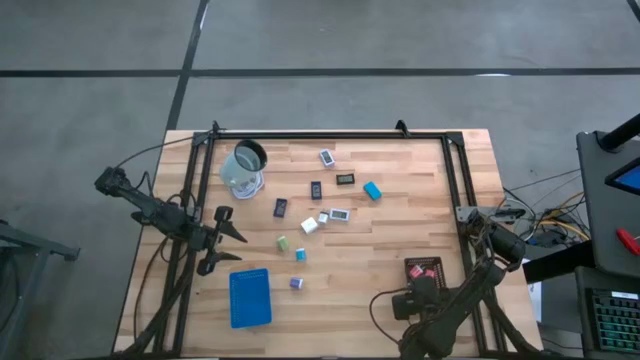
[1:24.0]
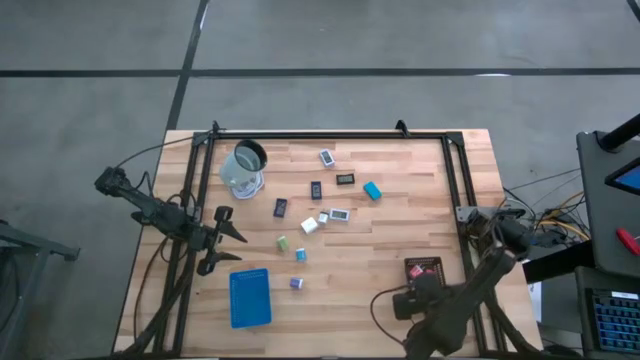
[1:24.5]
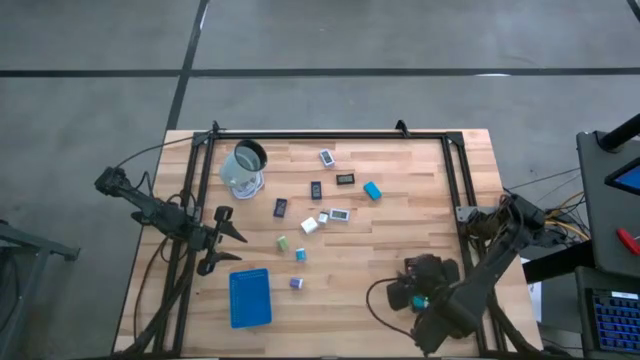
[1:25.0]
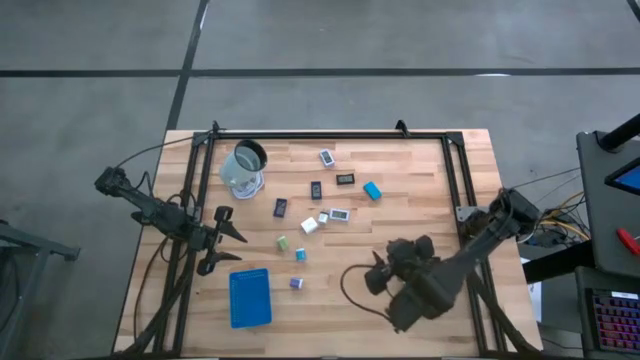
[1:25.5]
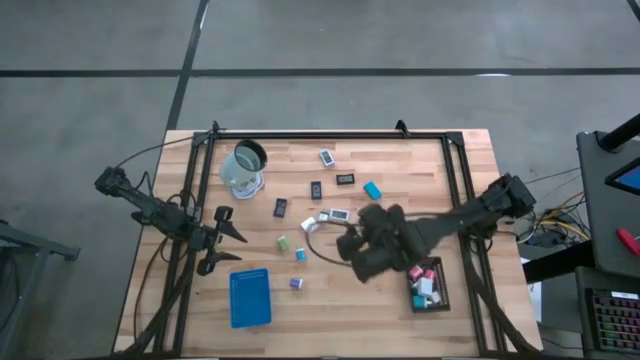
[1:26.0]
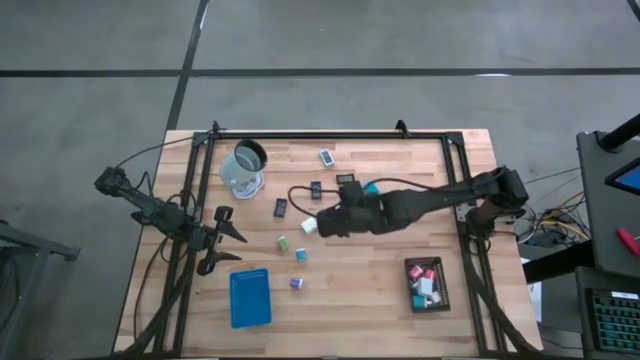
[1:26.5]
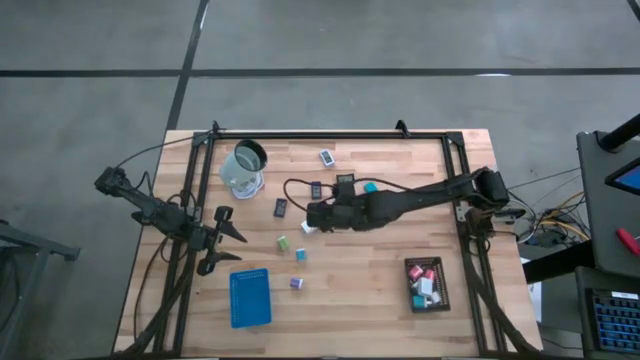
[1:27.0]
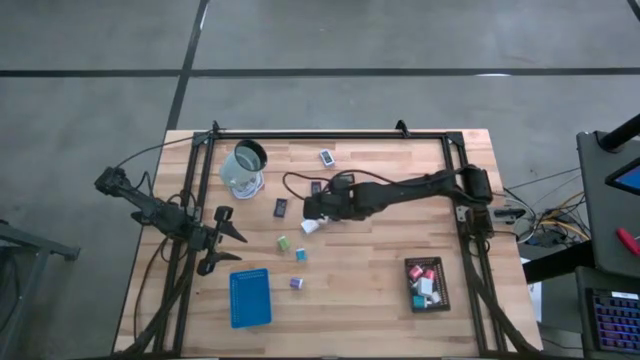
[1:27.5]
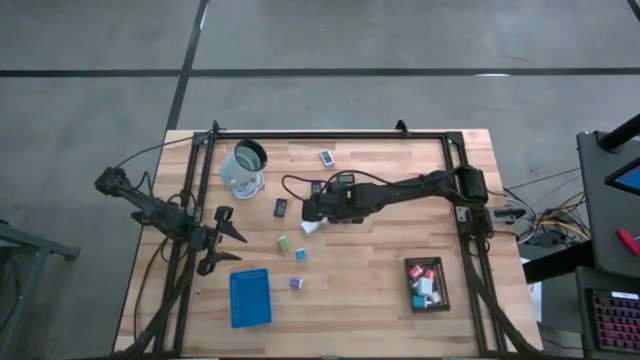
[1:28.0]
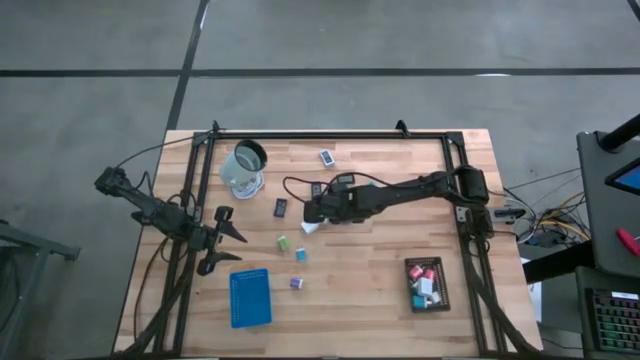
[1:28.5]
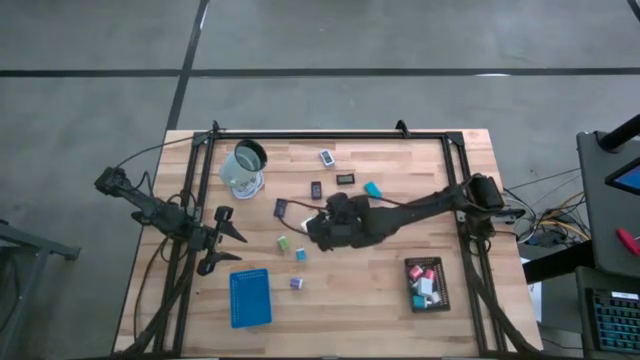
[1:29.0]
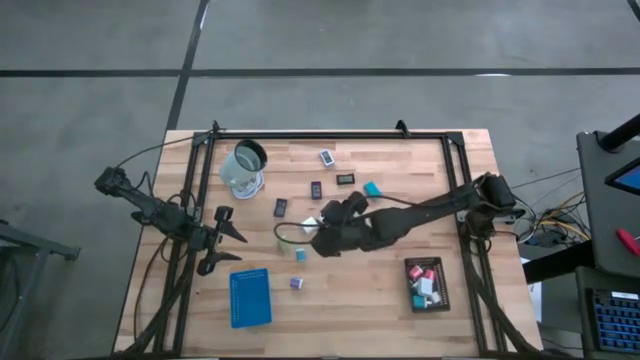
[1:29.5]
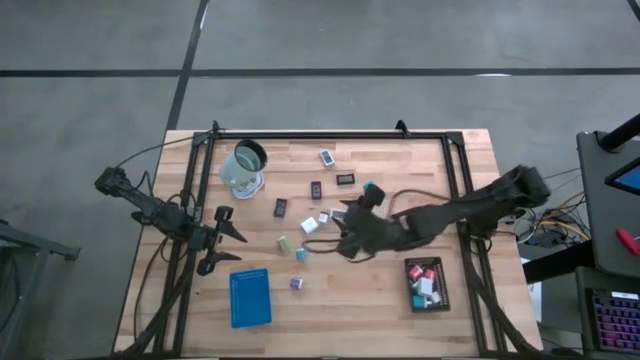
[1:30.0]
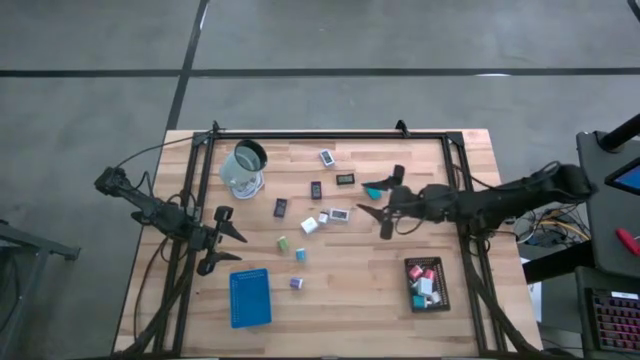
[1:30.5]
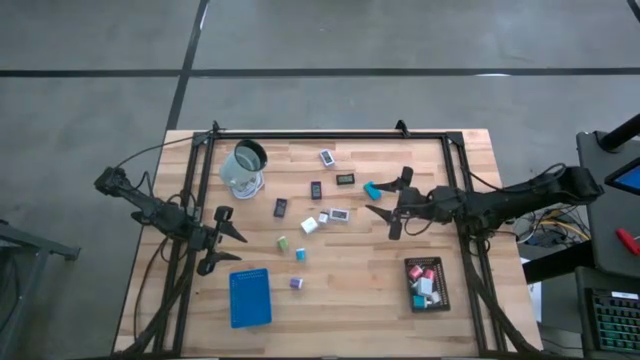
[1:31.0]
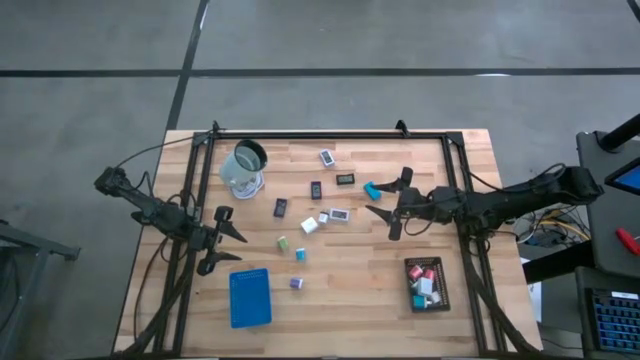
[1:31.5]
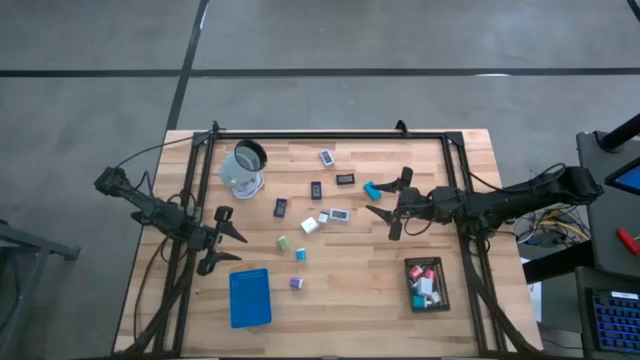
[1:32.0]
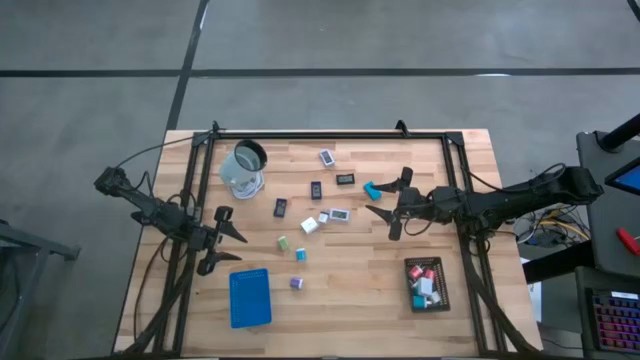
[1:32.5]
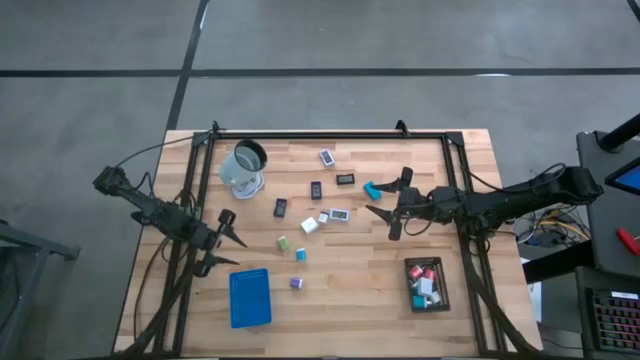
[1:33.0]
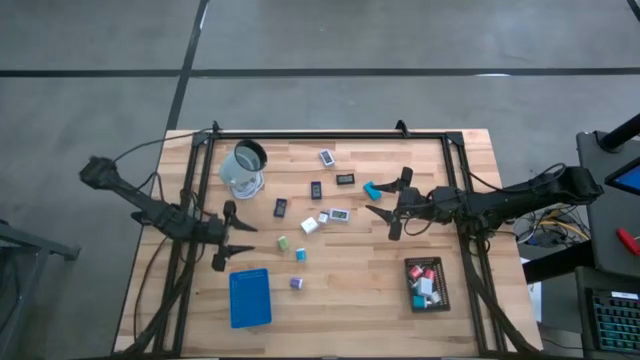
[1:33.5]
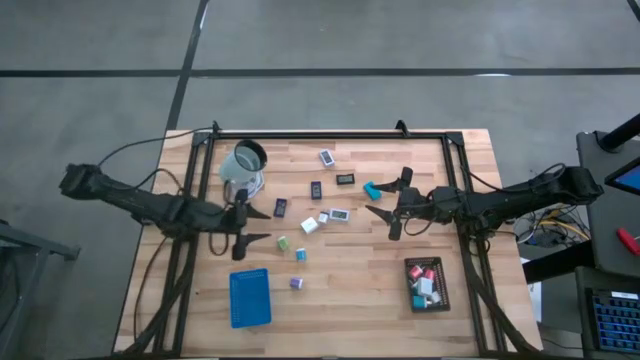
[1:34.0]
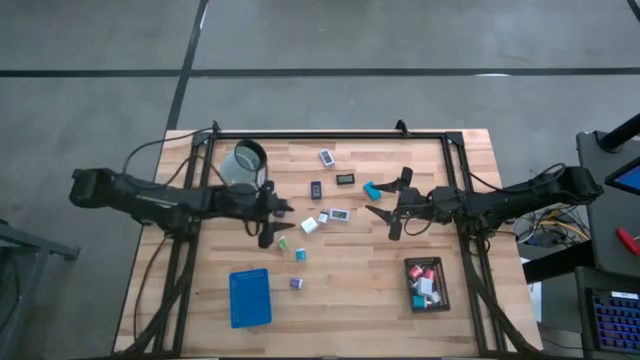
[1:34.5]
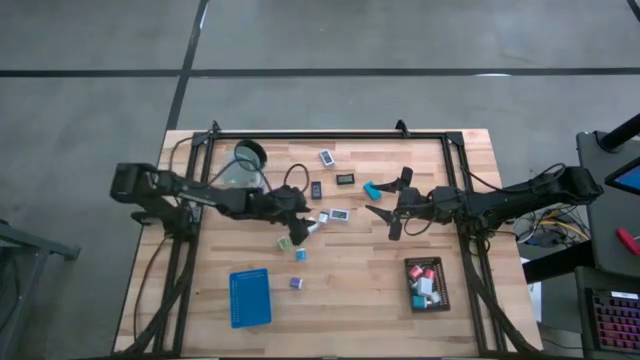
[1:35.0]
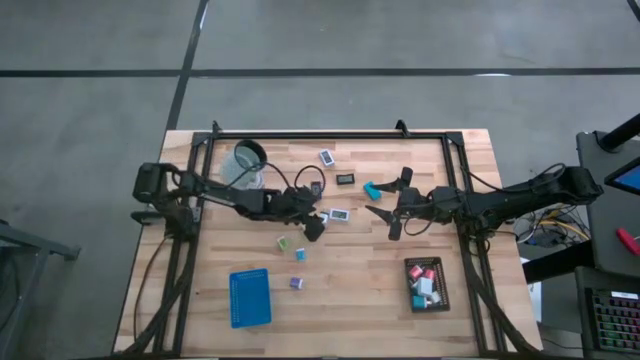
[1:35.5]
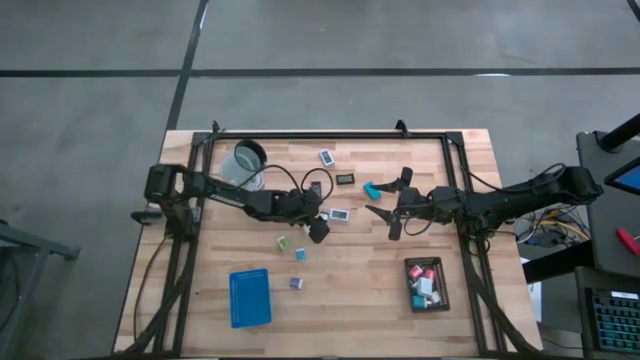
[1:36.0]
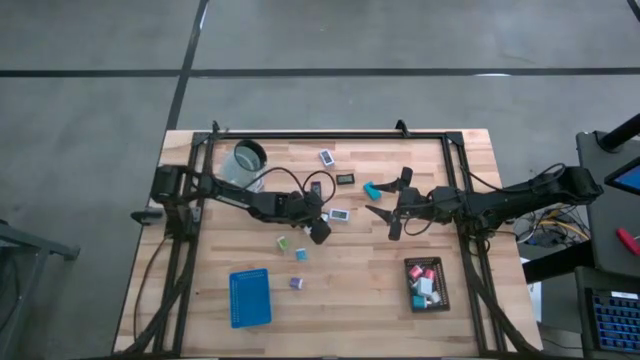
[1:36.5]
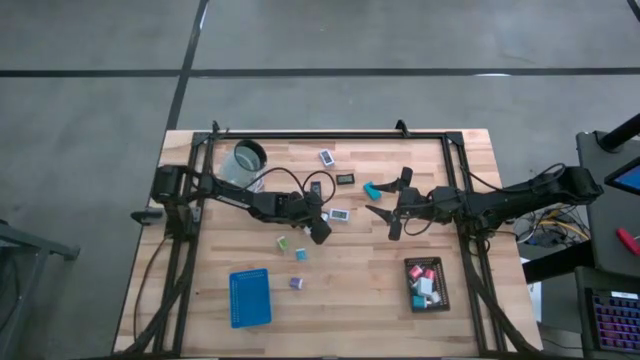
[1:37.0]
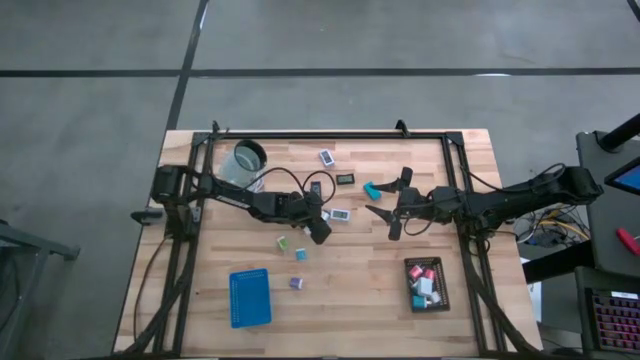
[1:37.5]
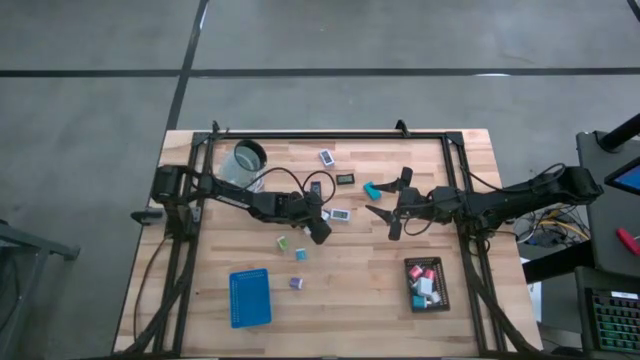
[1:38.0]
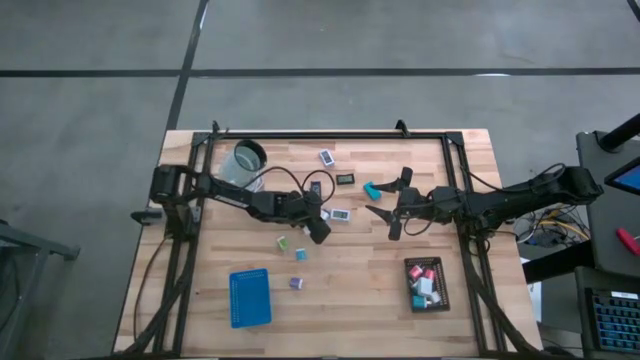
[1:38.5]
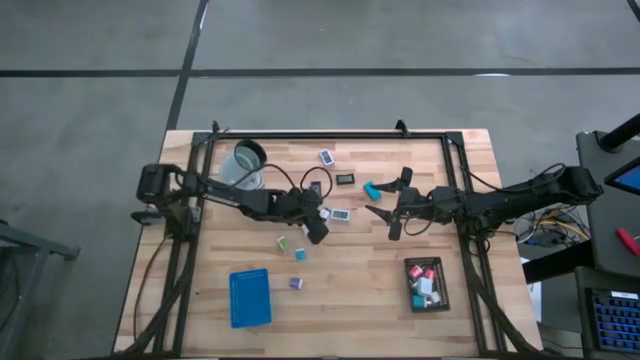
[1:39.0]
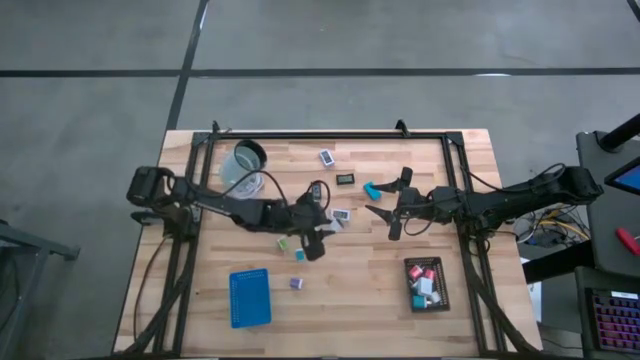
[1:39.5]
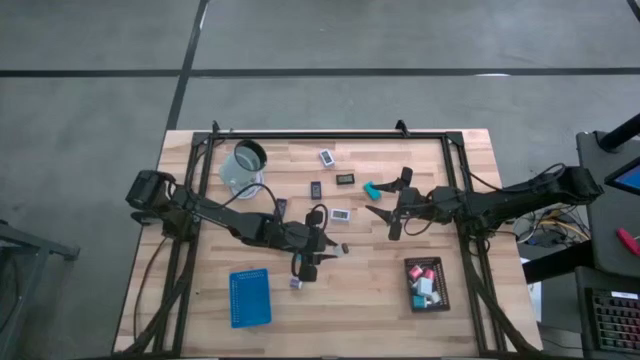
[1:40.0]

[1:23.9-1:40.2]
Task: Pick & Place Office items
Put the white black charger adapter into the black bin

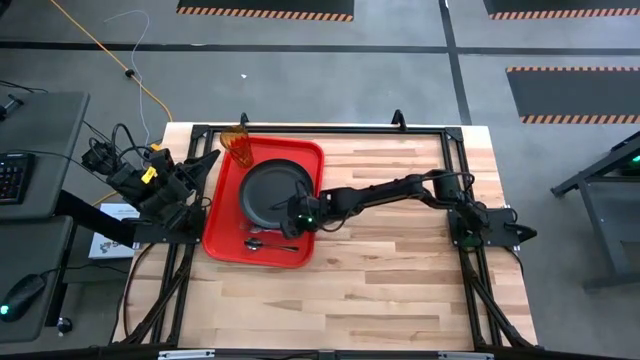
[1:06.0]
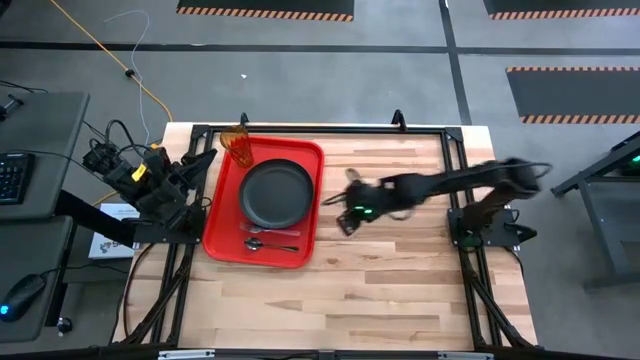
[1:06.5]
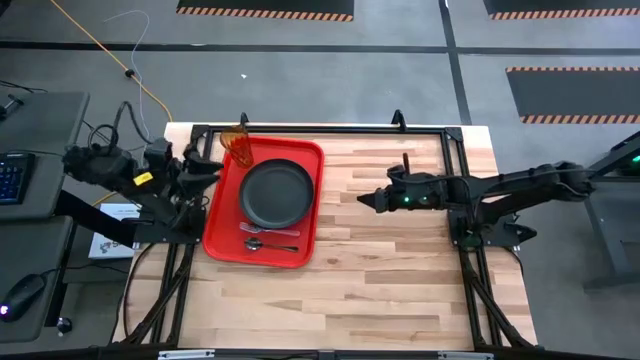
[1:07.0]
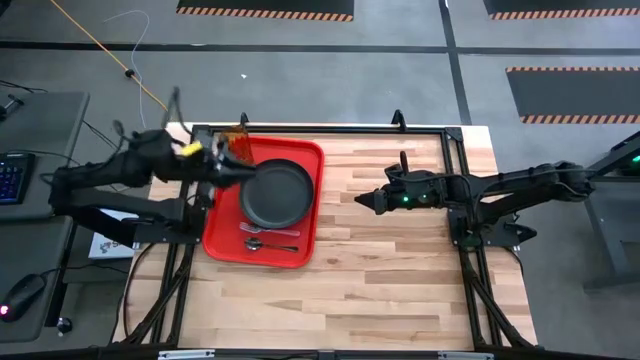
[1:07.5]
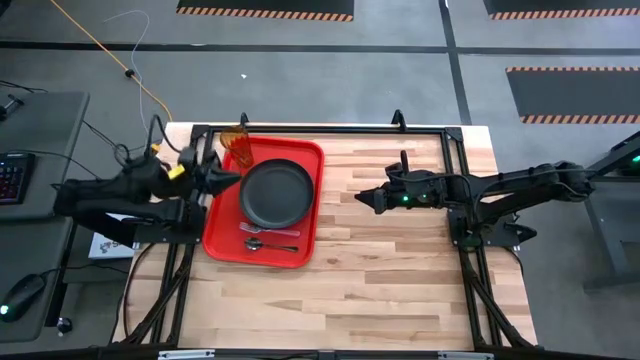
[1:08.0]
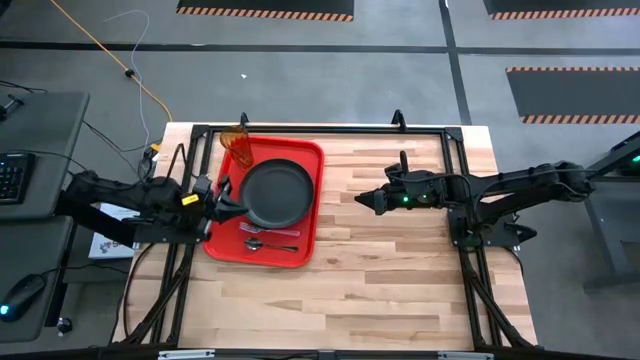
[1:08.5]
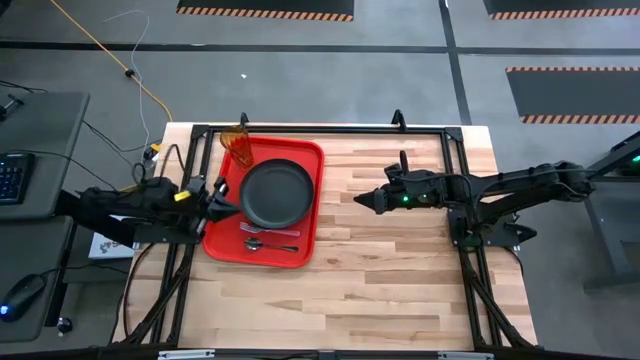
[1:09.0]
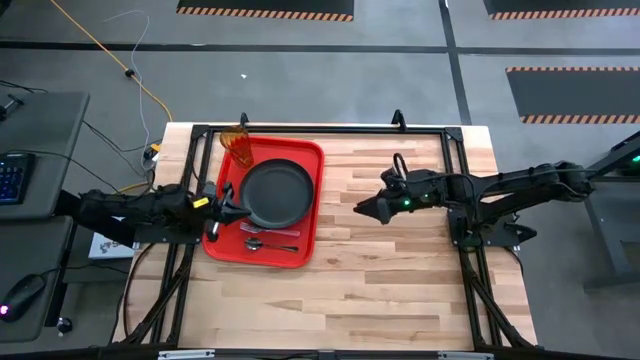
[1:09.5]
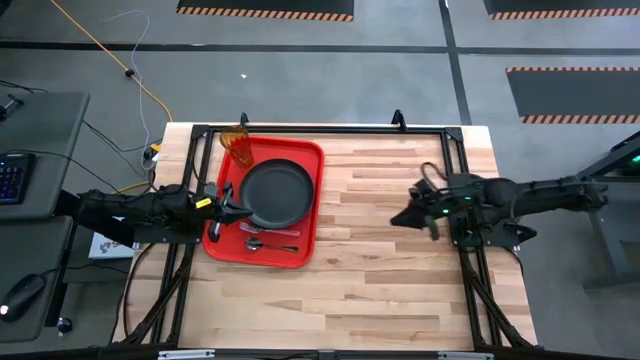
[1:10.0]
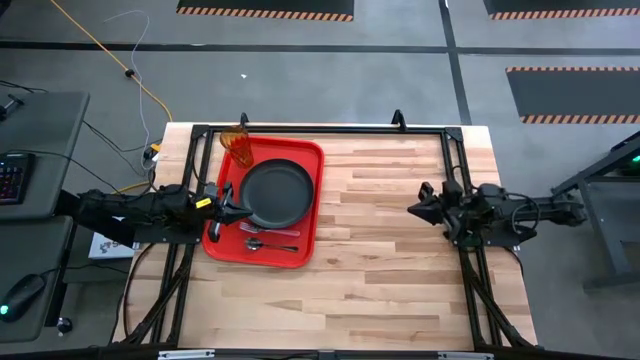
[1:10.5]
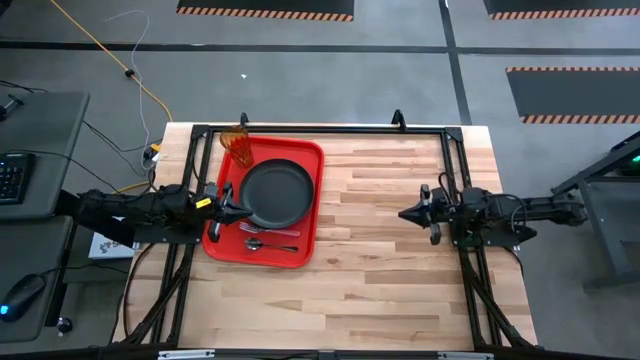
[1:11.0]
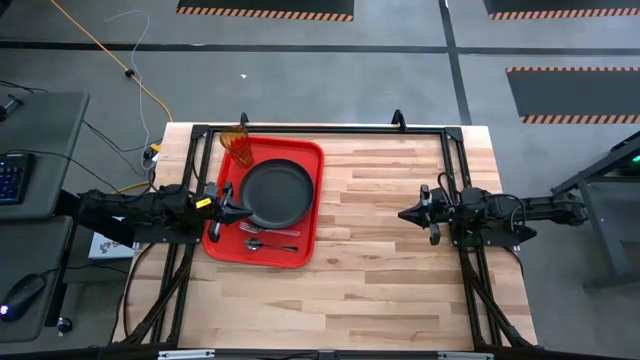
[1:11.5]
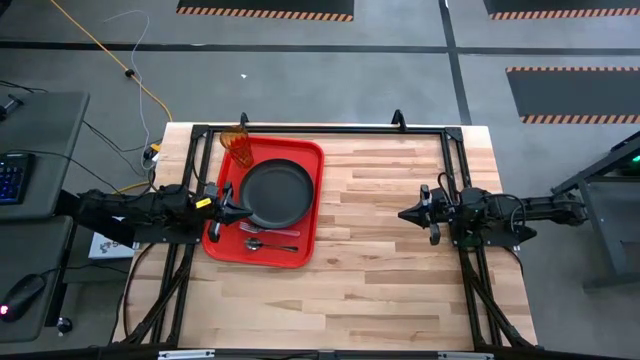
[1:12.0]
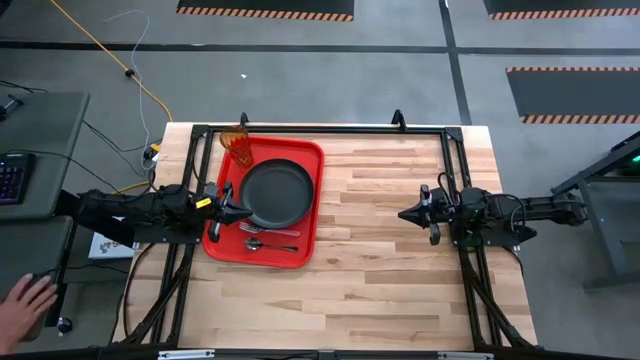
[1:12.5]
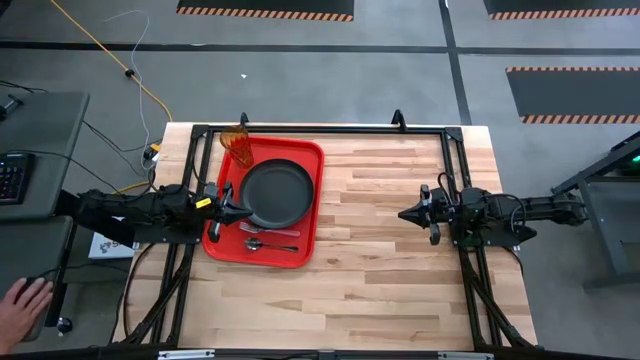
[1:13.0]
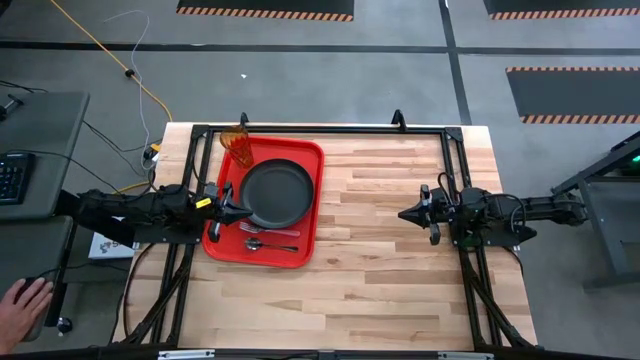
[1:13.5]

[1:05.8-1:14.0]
Task: Pick and place plate/cup/fork/spoon on tray
Return to Home Position
